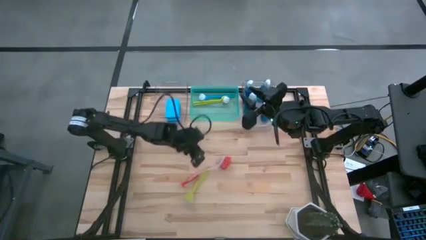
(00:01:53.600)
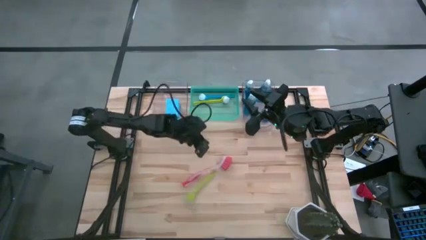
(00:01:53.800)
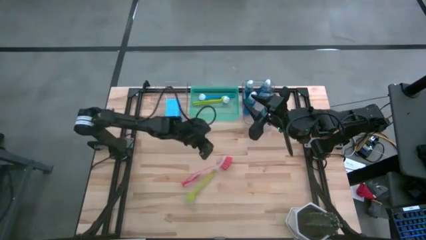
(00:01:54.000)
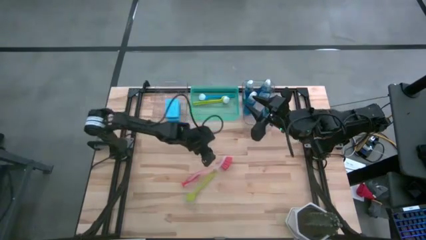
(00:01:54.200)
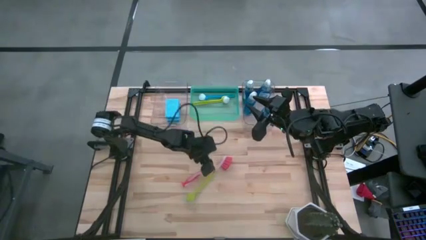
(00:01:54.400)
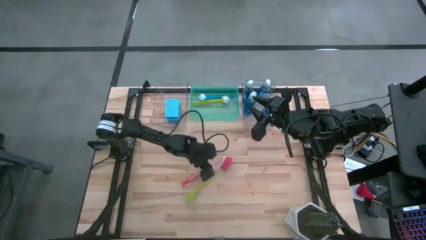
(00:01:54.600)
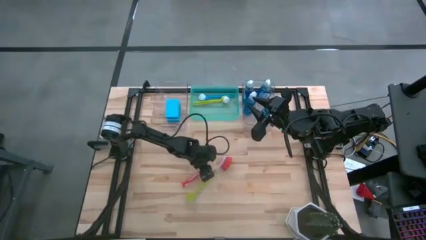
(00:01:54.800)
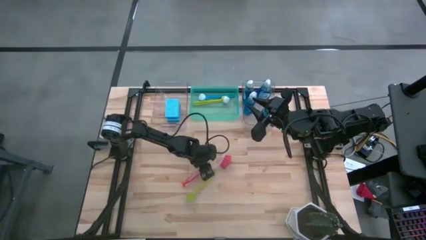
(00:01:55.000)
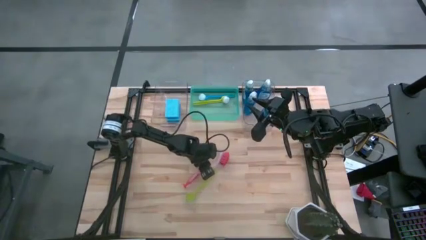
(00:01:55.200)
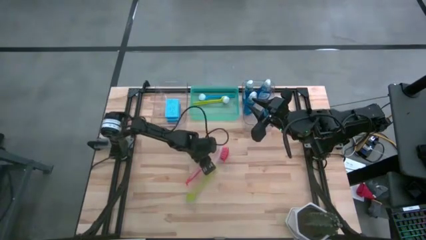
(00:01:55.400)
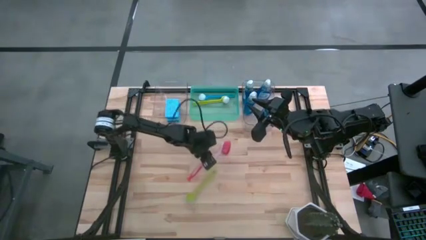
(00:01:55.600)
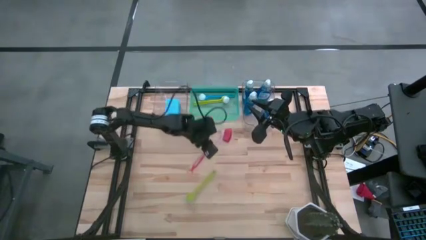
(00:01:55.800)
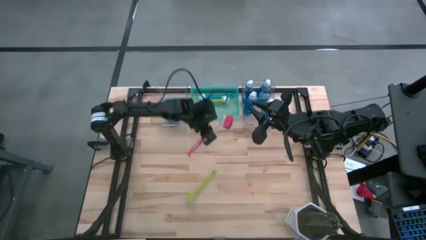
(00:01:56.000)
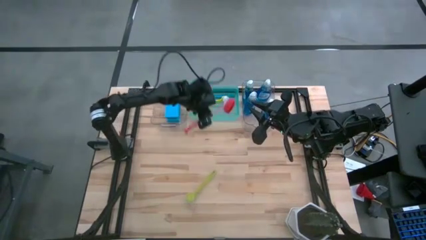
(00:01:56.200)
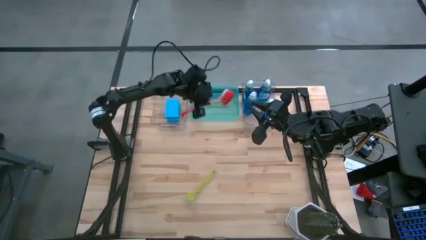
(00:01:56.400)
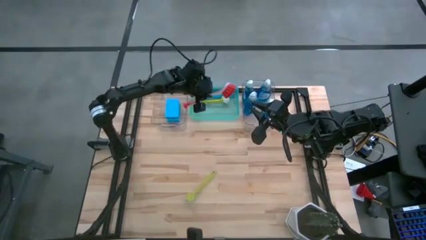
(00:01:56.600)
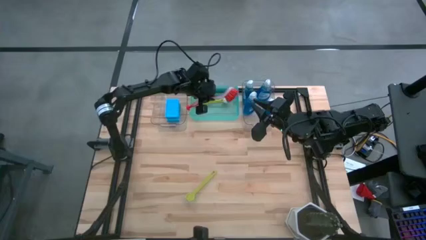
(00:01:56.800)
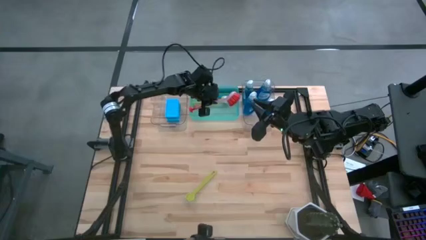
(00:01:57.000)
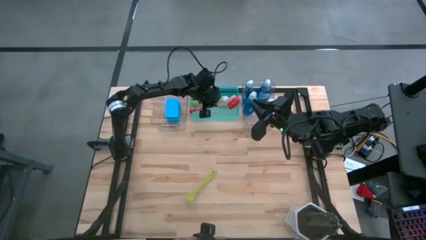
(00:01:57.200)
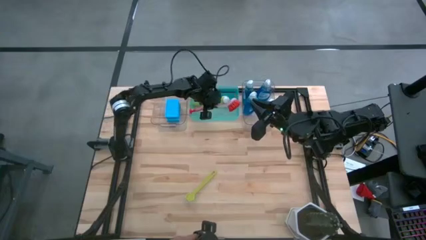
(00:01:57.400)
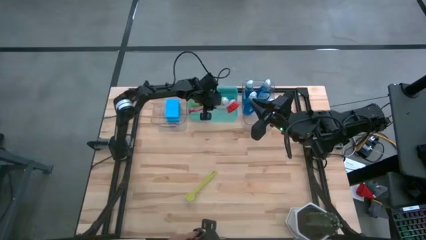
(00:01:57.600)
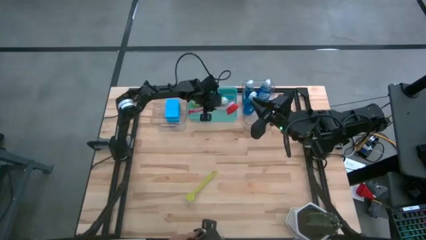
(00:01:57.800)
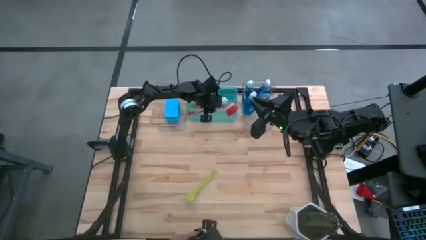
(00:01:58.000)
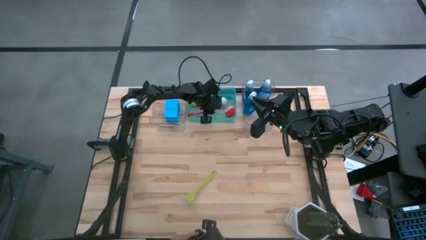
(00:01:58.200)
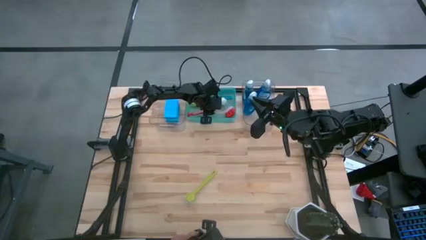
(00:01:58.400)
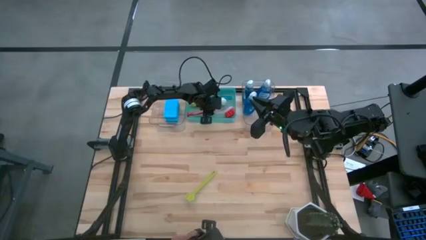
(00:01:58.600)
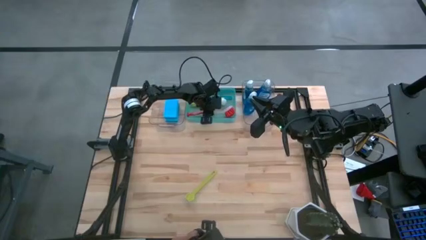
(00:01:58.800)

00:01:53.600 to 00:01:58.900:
Task: Pick & Place Kitchen Sink Supplies
Put the orange dishwashing brush into the green bin

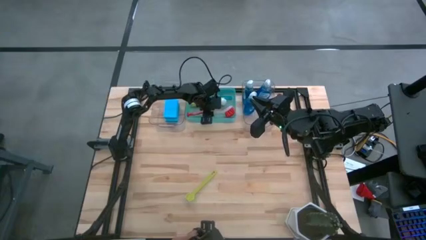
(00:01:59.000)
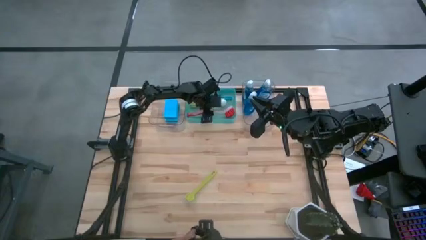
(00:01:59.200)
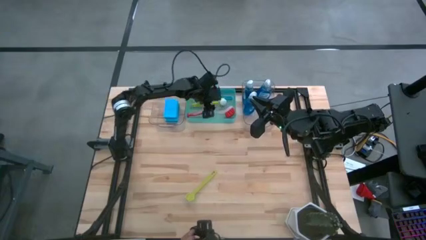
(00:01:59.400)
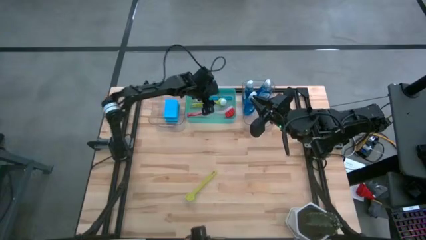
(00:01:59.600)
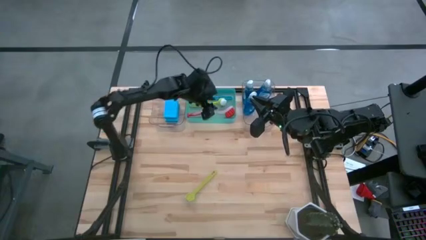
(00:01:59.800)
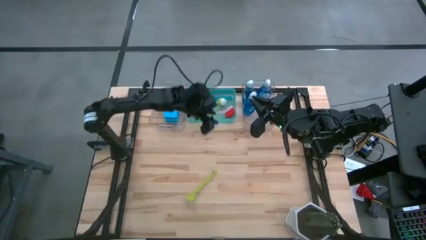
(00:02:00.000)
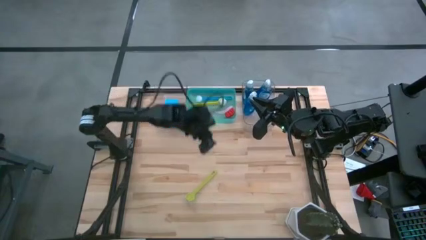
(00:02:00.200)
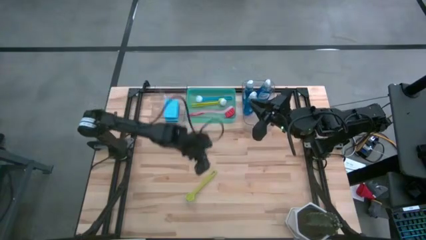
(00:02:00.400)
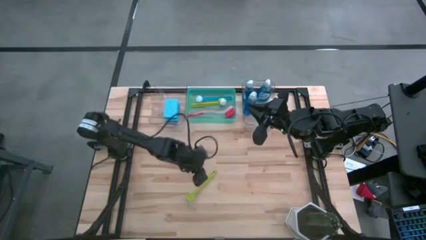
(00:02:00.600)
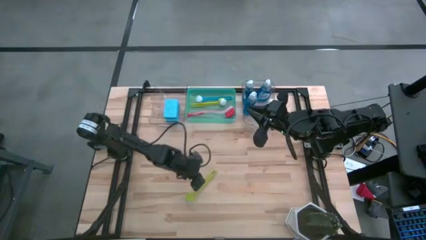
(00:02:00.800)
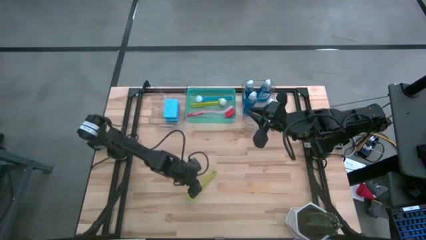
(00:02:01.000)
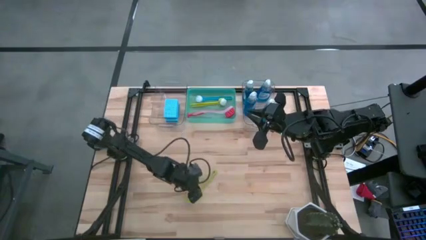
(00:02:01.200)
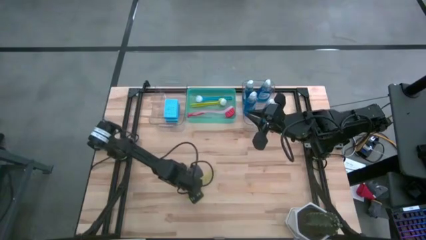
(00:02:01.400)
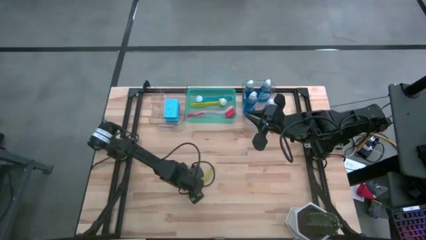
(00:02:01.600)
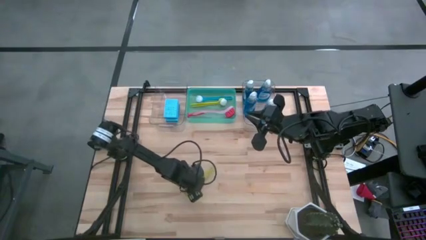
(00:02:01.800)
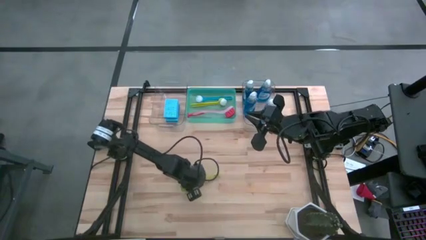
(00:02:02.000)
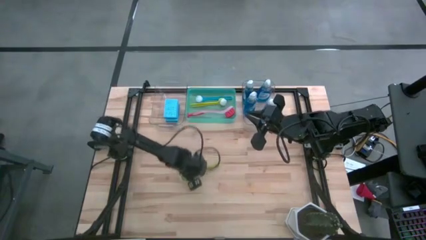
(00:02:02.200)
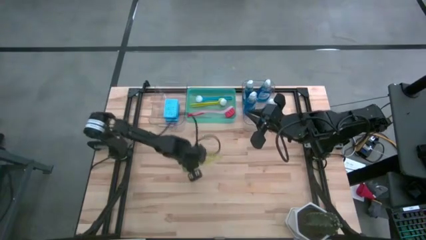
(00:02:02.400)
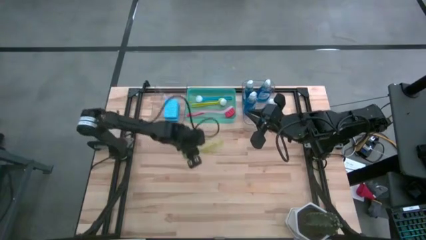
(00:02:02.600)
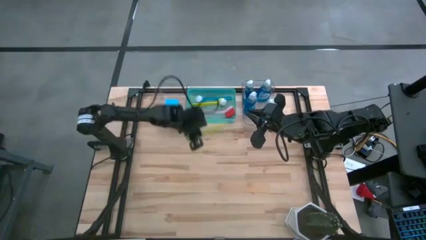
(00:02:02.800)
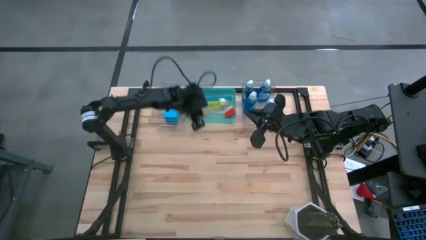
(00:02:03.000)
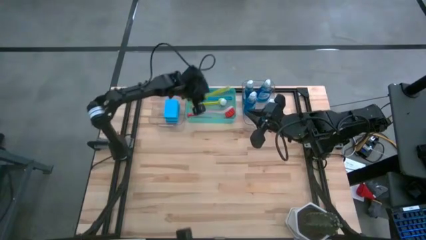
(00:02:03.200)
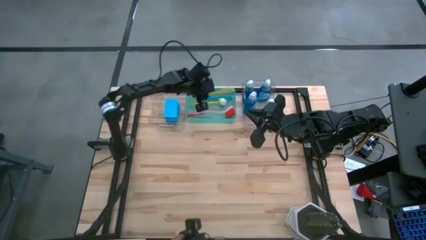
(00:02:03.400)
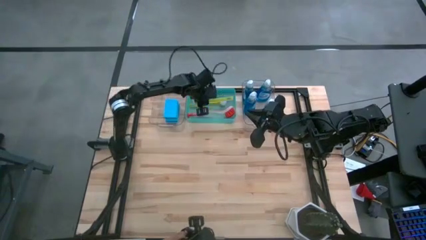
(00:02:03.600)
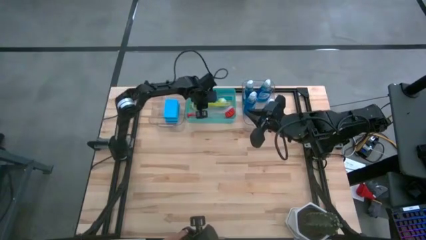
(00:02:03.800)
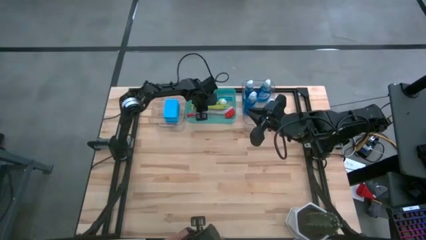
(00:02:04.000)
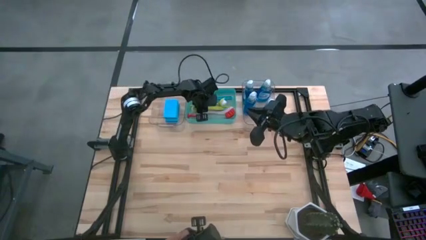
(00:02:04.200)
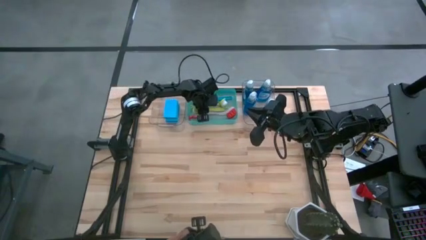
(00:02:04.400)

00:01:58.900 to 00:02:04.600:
Put the green dishwashing brush into the green bin

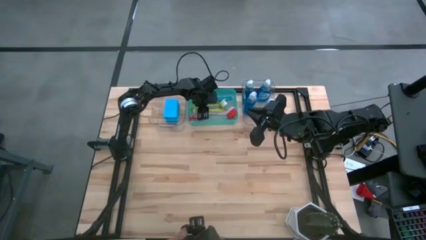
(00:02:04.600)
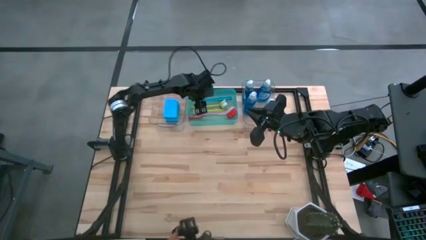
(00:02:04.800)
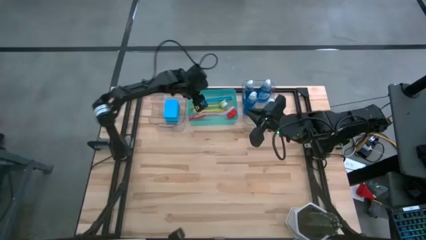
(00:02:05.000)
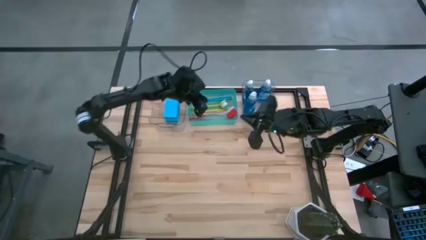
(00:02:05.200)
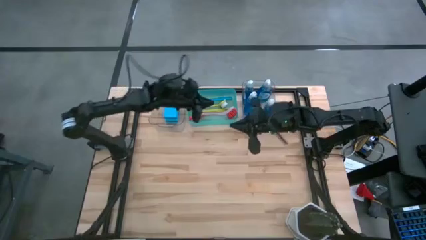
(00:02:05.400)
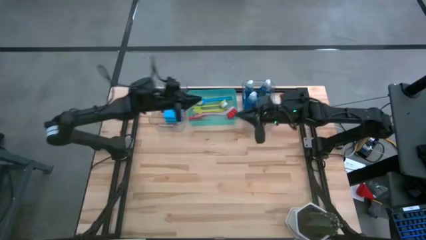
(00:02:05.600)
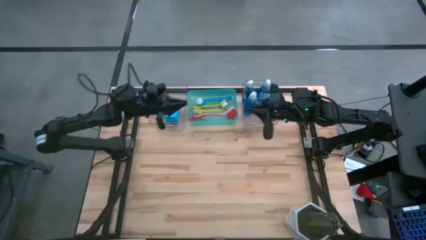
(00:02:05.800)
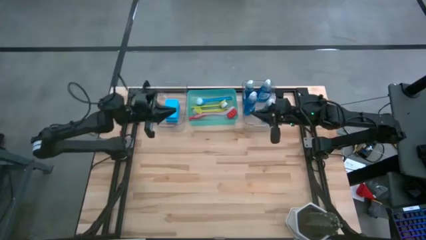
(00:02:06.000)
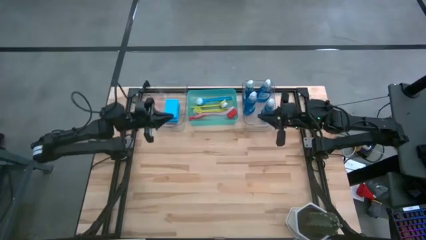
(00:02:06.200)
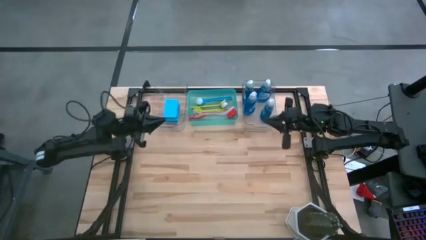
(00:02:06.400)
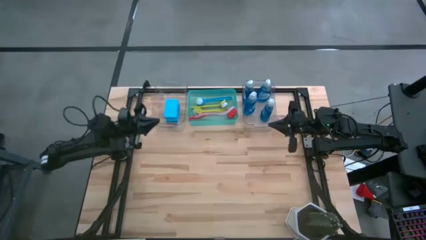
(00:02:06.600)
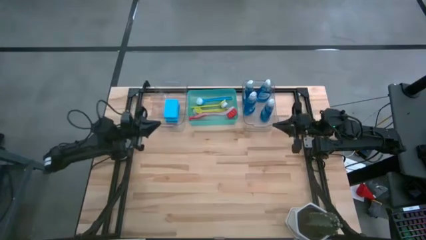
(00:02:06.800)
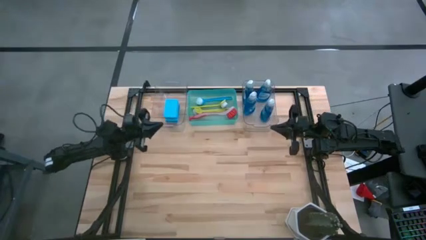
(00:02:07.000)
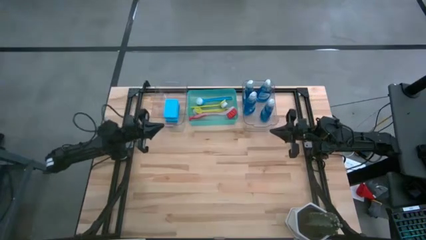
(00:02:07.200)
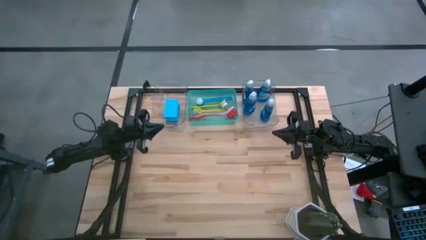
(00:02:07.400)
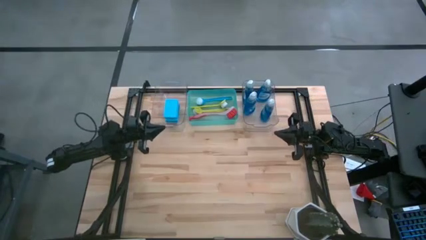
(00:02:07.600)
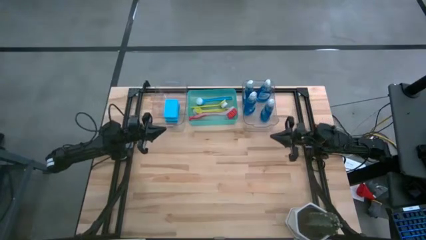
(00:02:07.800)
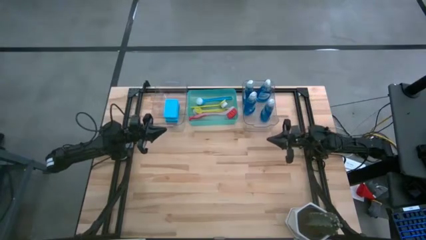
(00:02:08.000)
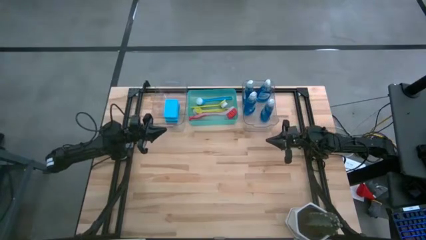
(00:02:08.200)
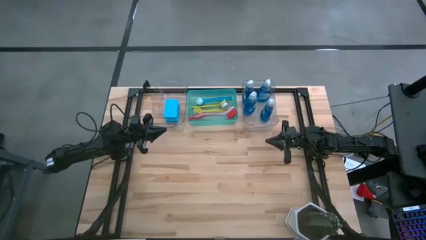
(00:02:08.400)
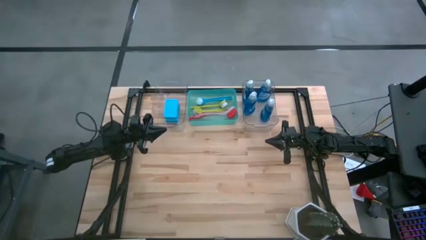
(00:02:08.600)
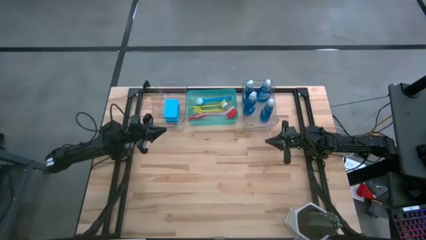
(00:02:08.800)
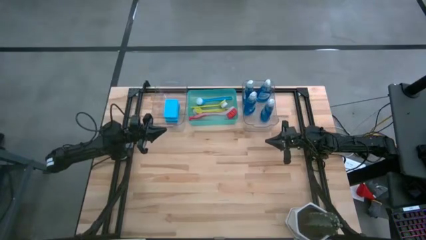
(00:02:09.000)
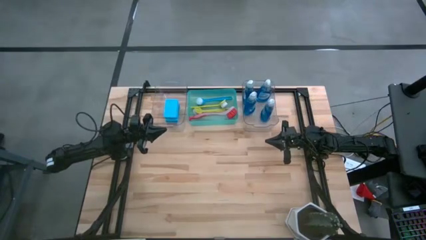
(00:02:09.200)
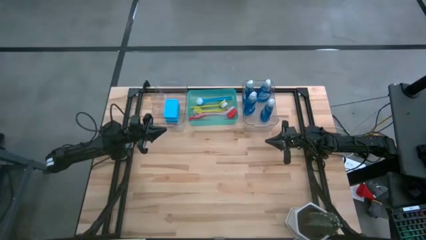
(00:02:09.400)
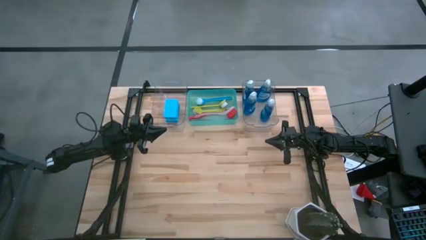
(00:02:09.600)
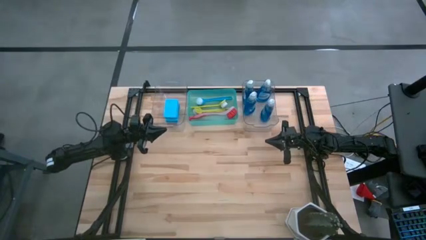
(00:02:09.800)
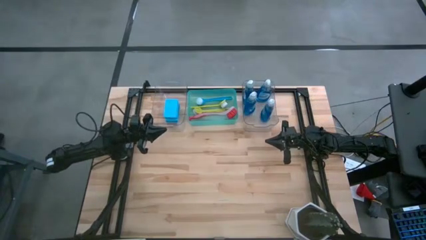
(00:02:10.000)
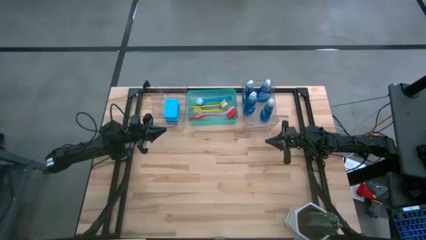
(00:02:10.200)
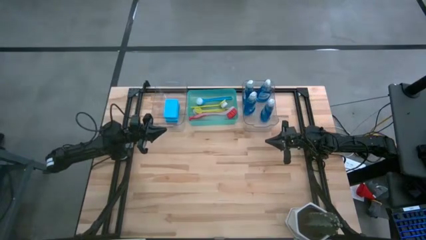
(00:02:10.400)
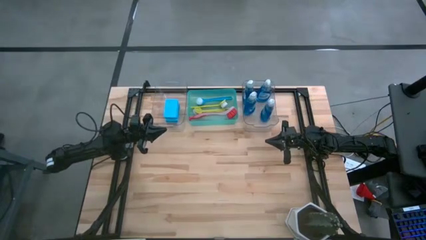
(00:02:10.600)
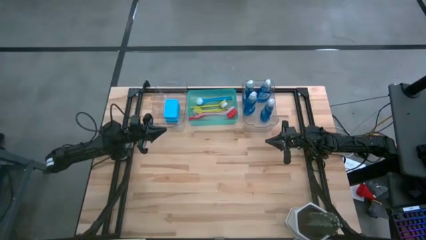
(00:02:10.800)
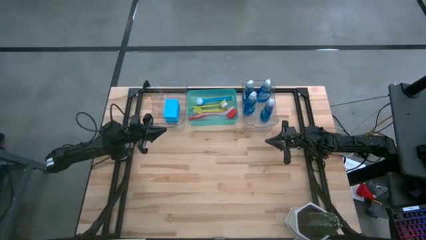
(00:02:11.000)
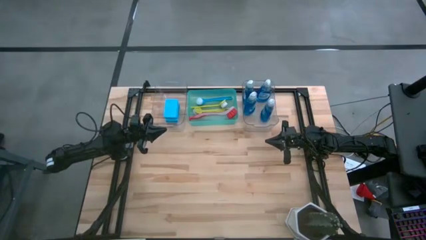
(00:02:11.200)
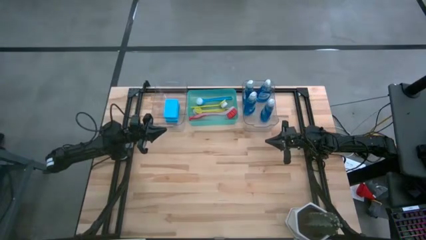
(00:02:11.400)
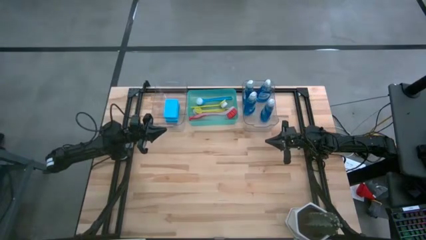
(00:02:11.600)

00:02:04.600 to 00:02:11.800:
Return to home position
